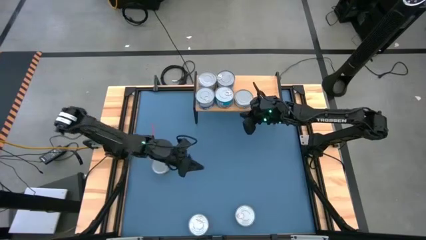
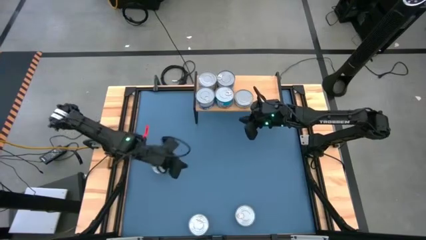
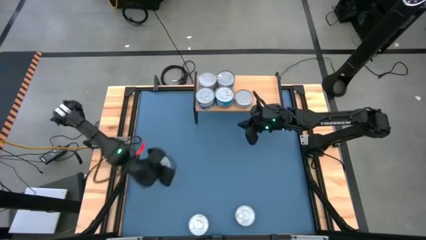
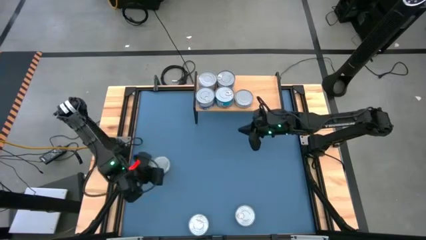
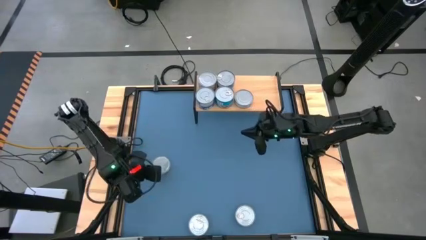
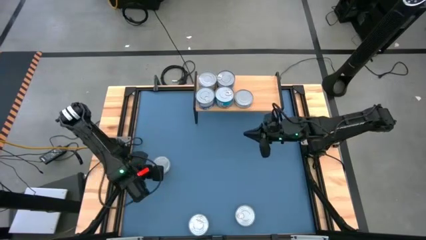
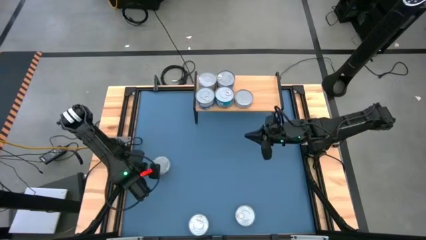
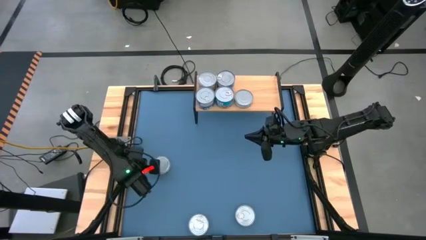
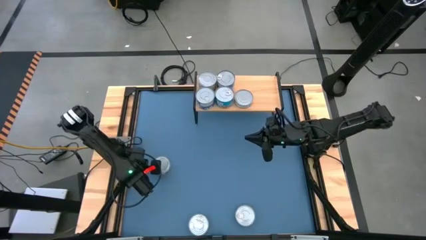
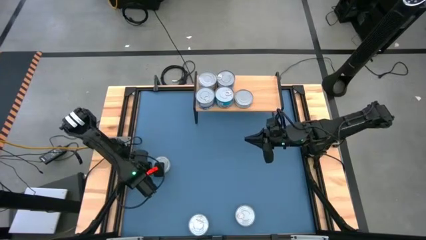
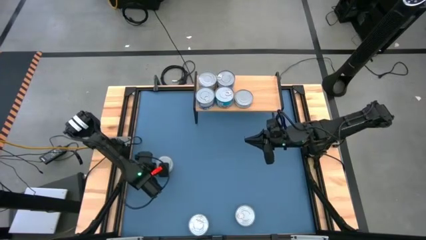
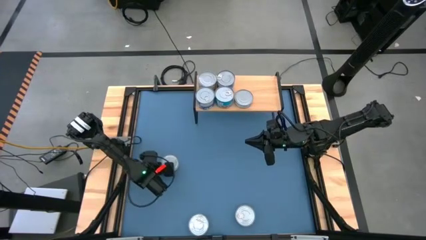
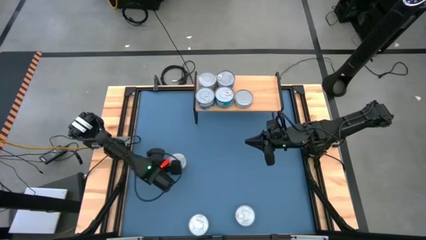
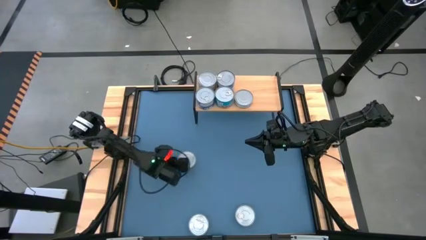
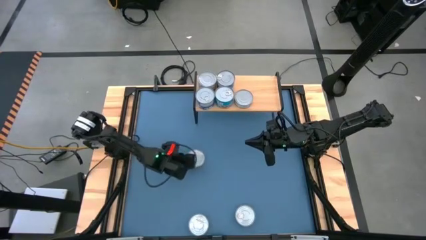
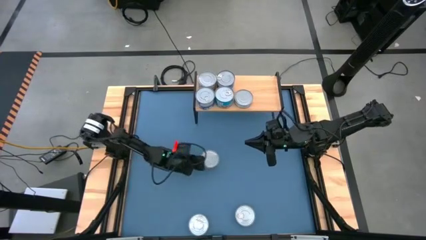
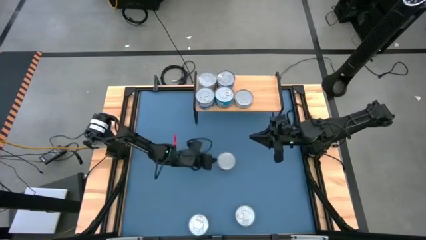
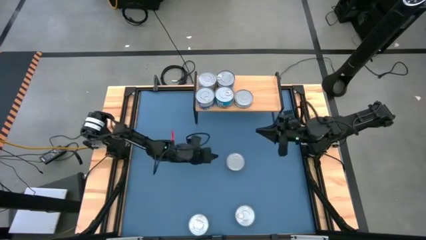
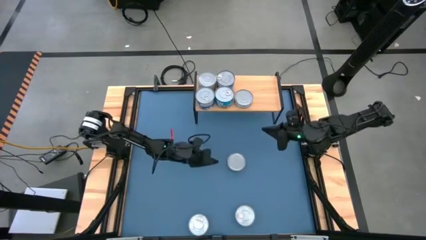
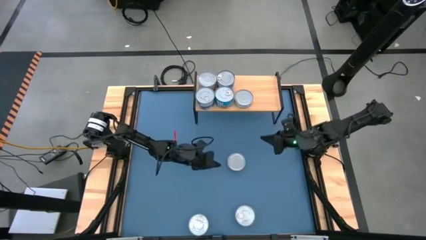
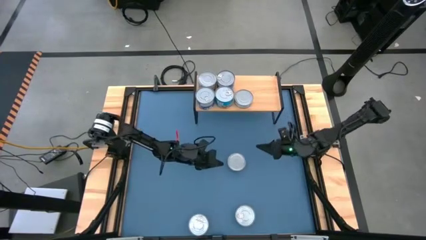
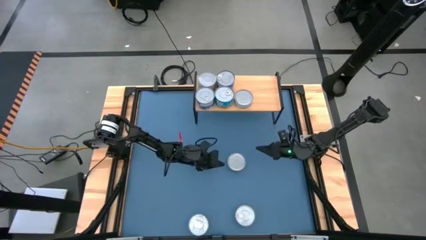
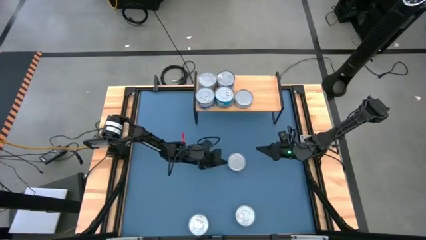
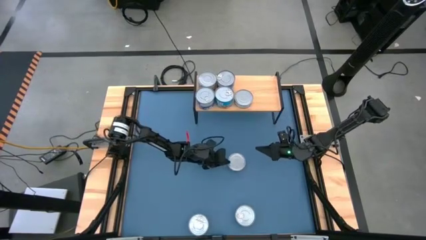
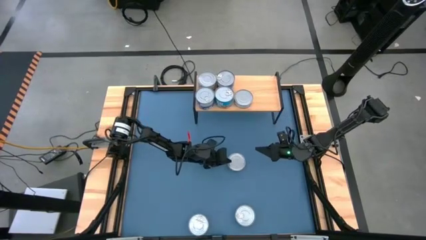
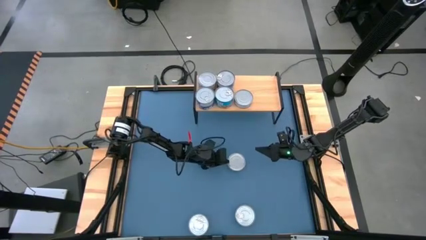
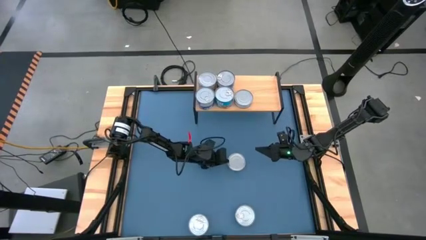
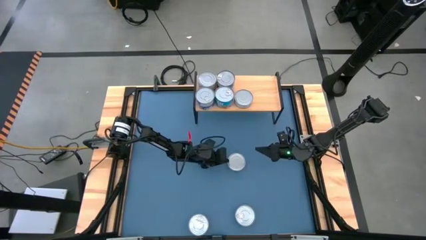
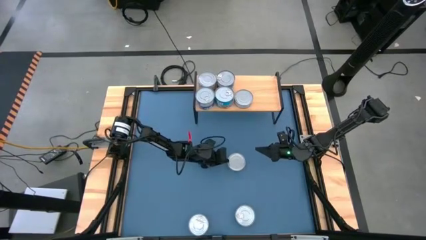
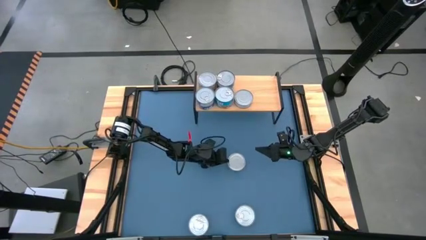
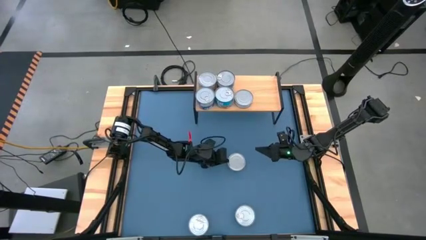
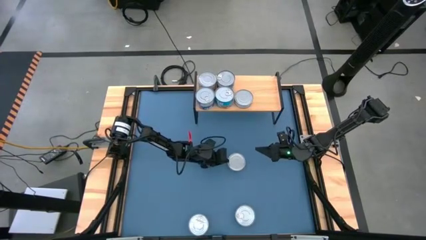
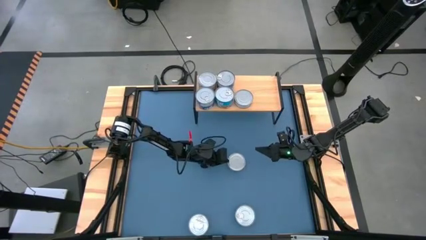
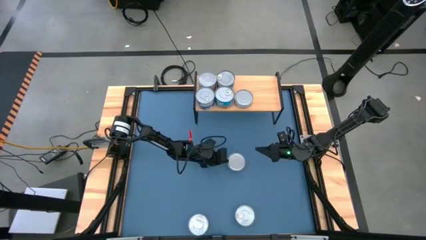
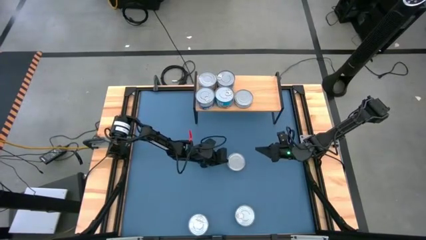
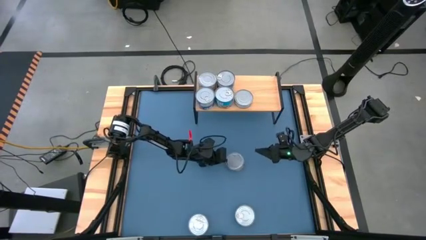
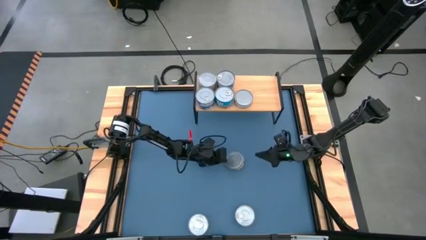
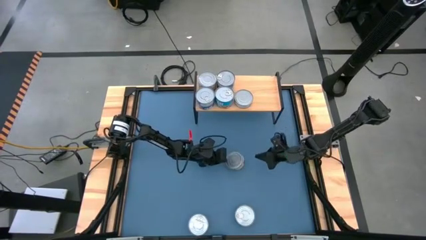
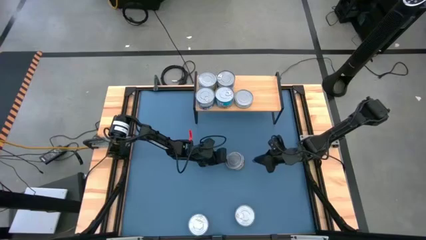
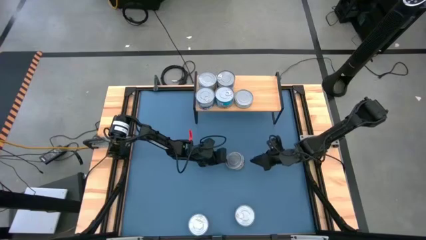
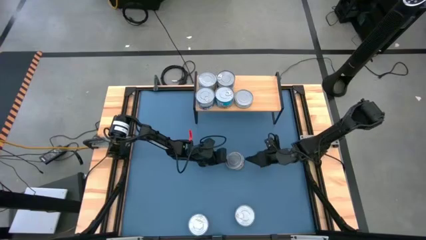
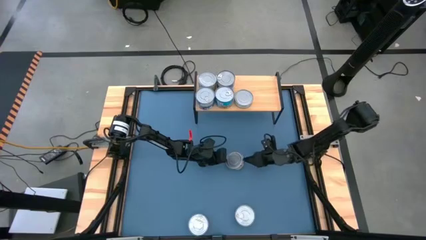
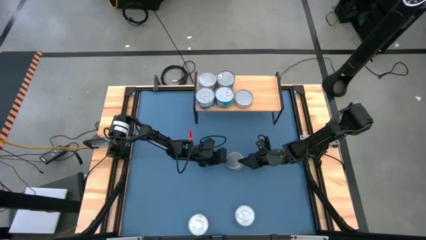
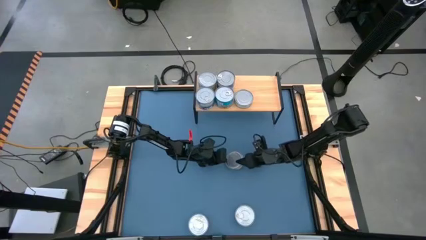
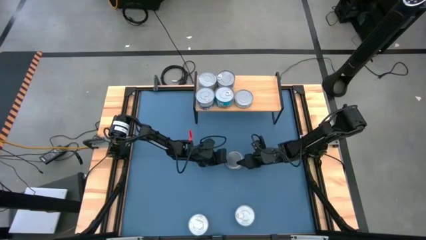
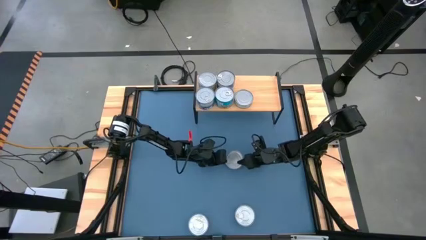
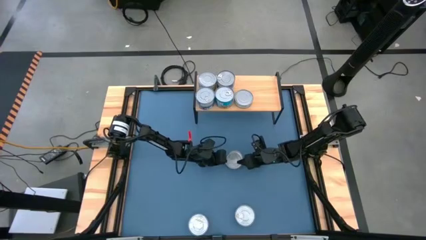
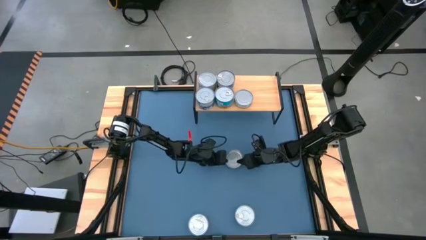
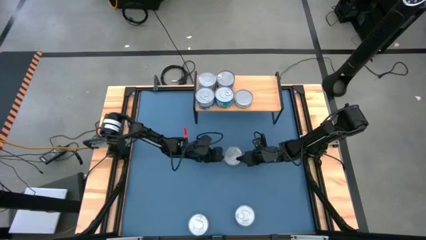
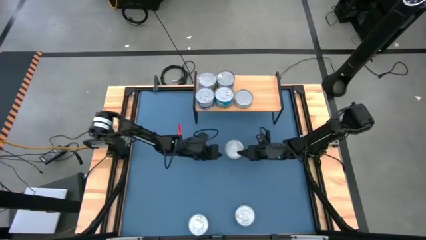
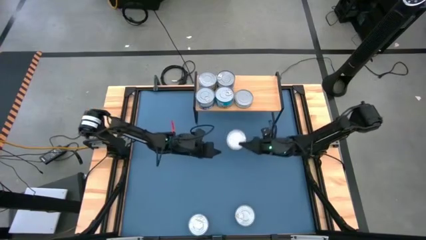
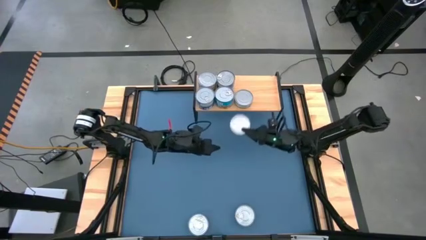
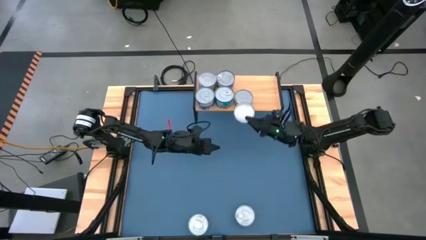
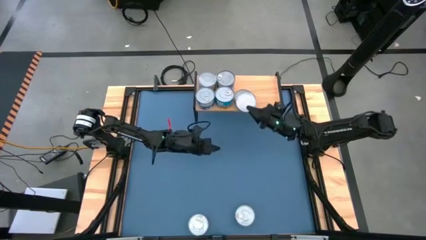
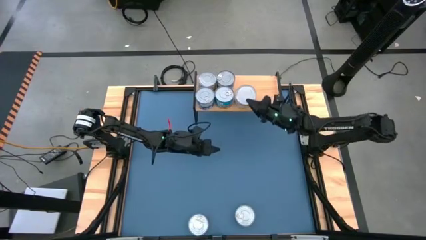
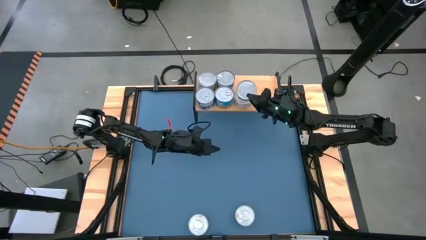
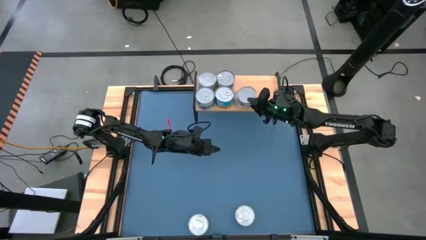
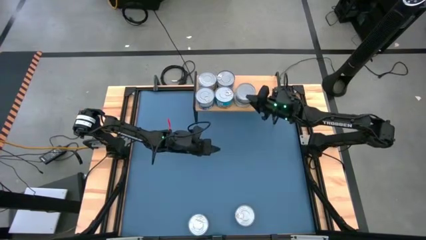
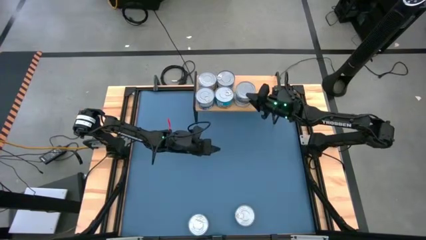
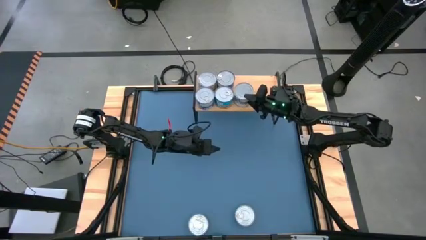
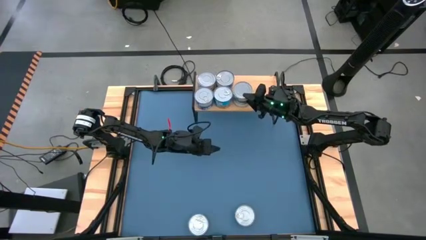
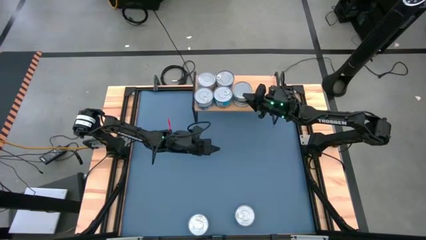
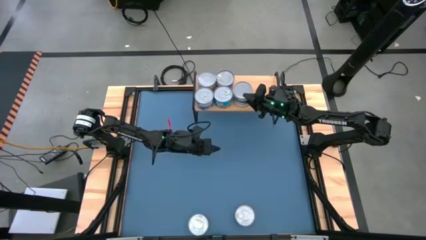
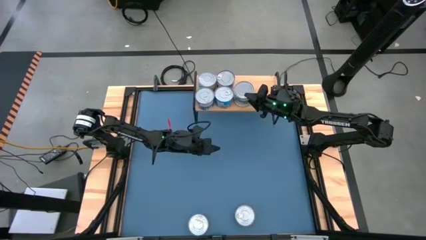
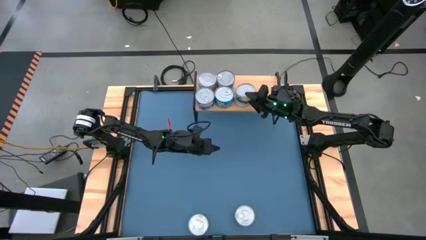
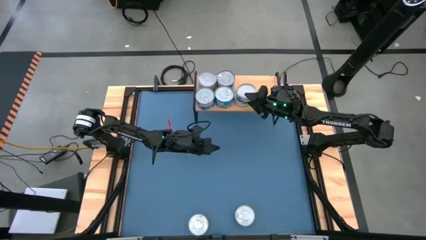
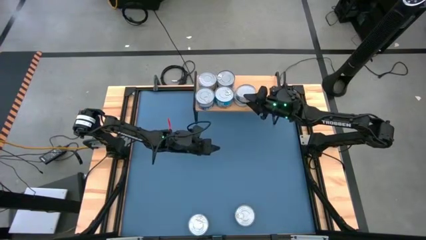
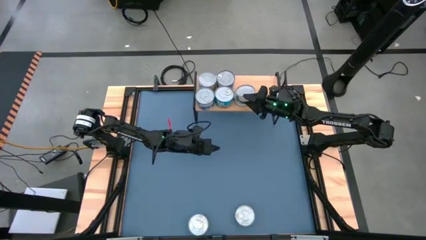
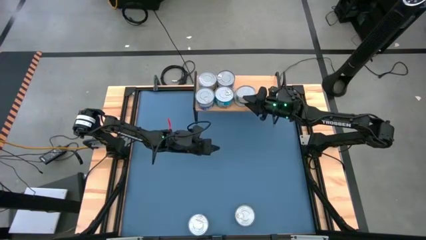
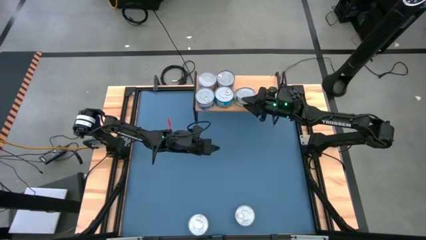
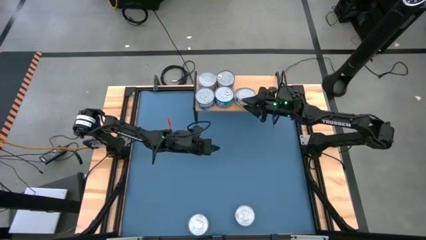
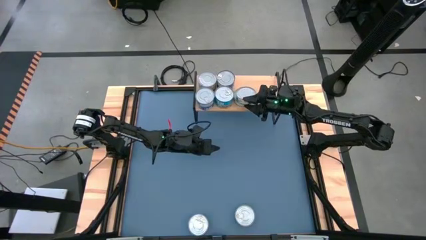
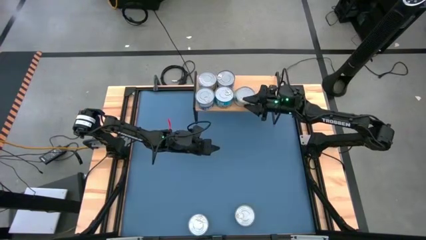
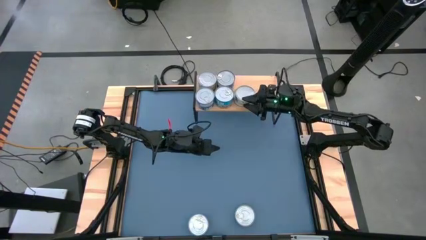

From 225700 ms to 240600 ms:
Task: Stack canned seafood by type on shelf
Stack the green tuna can on top of the green tuna can on the shelf

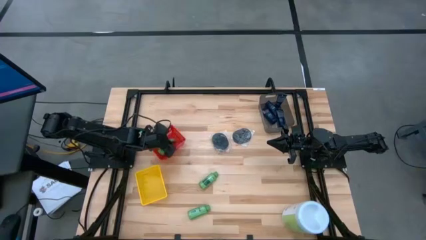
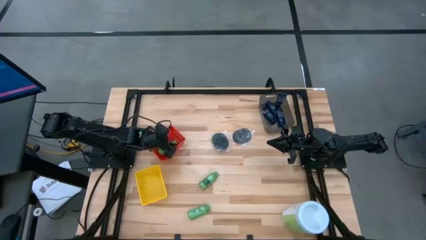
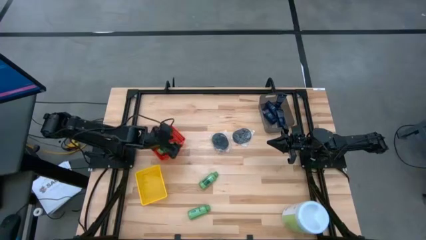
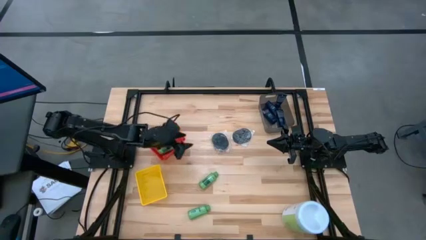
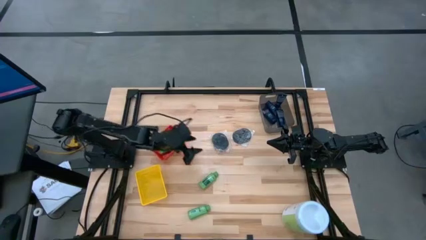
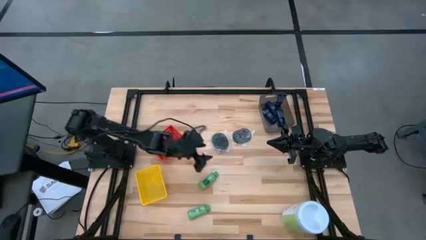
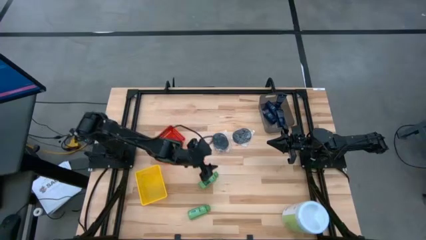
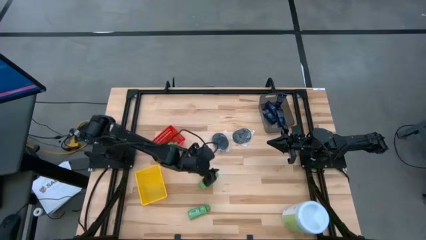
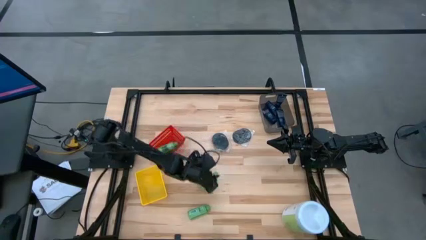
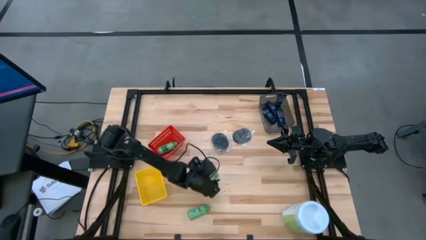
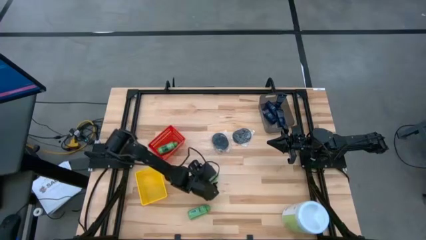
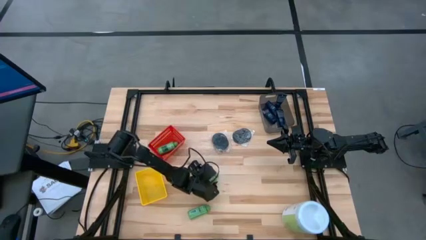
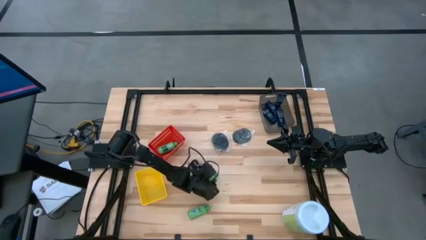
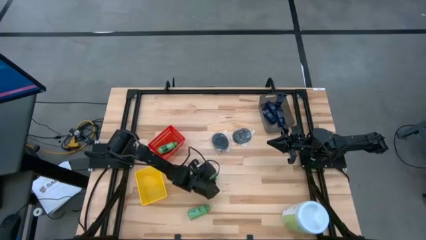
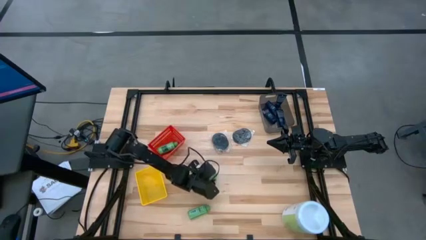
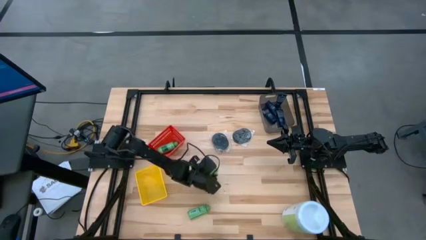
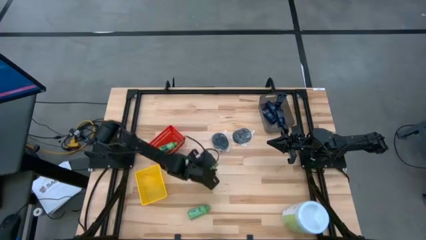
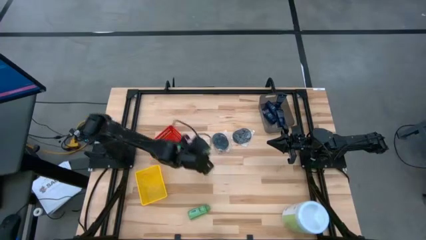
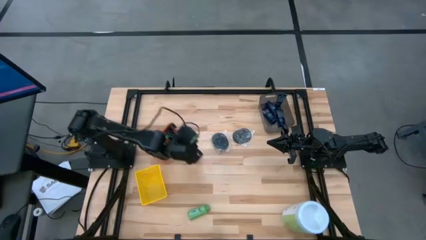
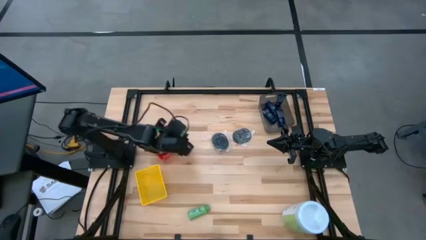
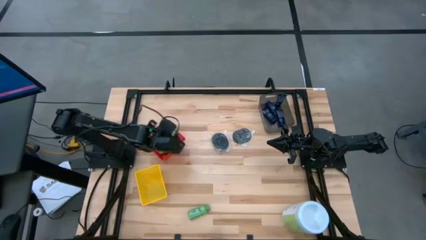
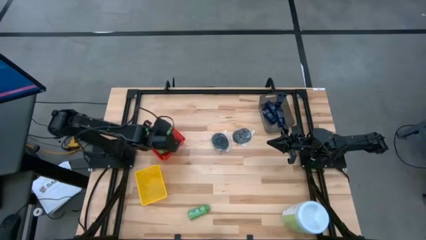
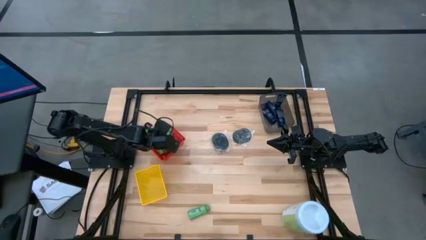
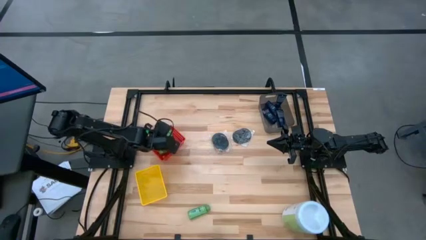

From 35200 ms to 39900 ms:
Task: Pick & Place Travel size toiletries
Put the middle bottle of shampoo into the red bin
